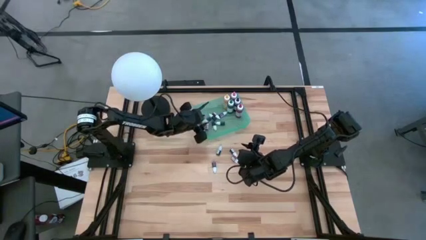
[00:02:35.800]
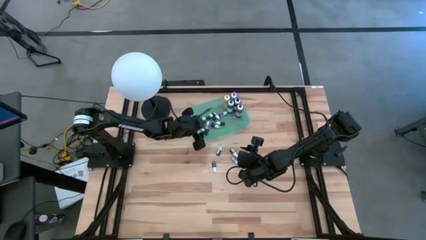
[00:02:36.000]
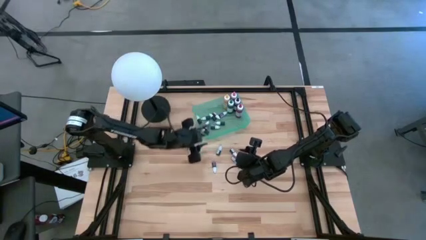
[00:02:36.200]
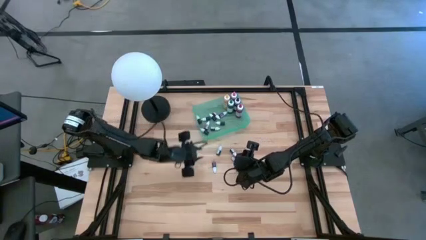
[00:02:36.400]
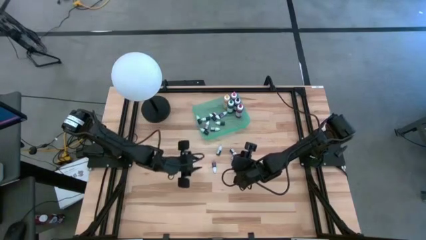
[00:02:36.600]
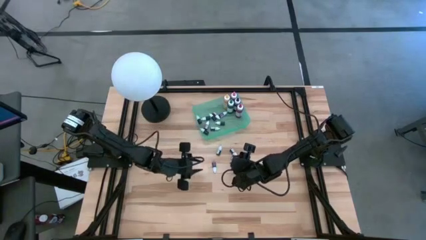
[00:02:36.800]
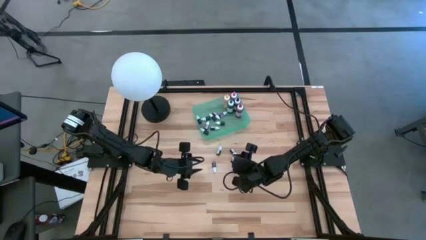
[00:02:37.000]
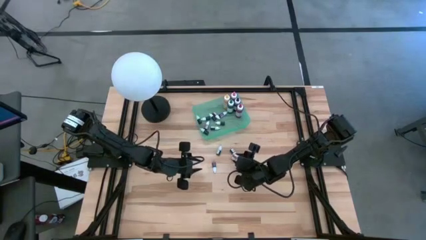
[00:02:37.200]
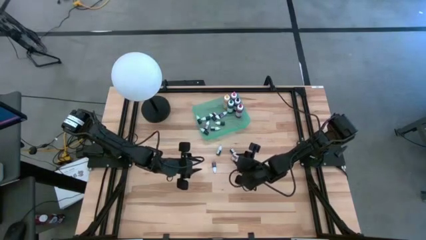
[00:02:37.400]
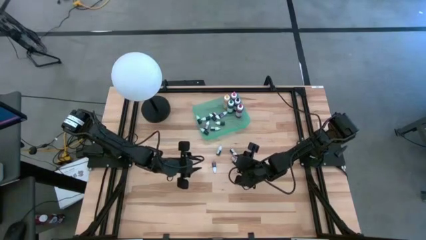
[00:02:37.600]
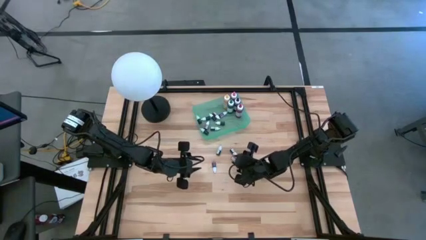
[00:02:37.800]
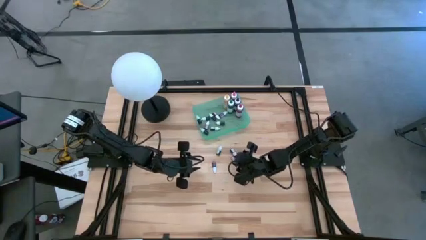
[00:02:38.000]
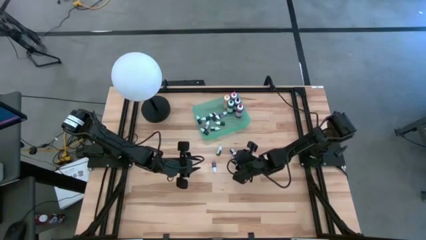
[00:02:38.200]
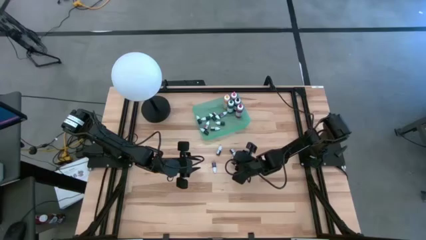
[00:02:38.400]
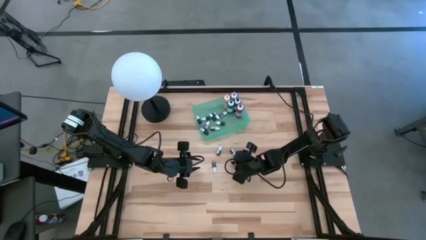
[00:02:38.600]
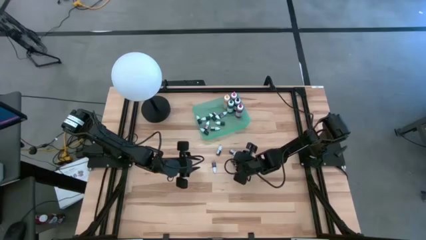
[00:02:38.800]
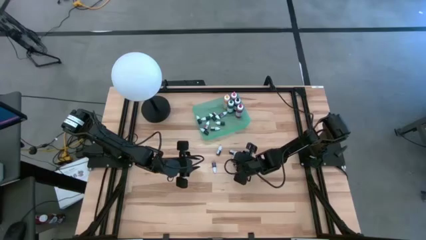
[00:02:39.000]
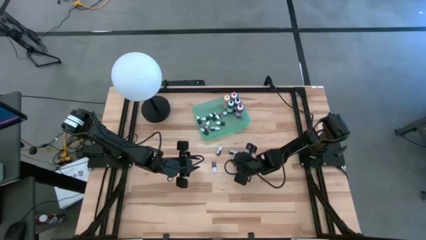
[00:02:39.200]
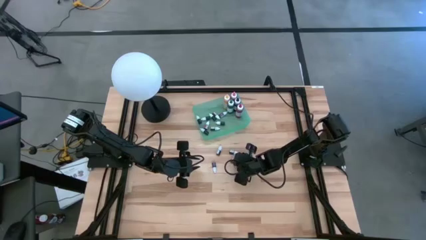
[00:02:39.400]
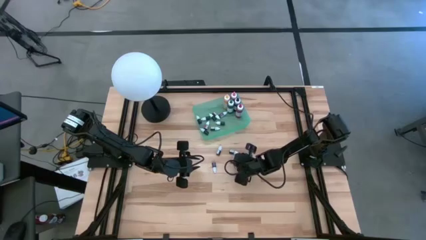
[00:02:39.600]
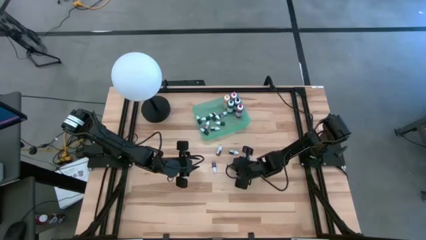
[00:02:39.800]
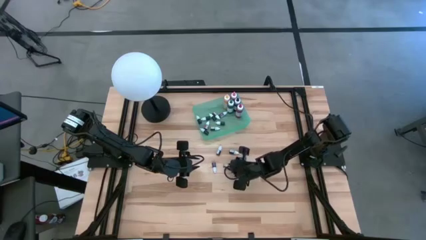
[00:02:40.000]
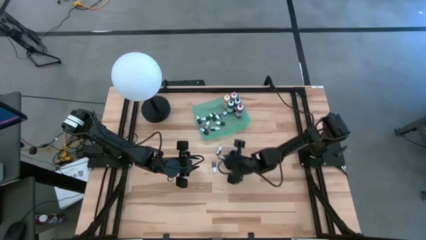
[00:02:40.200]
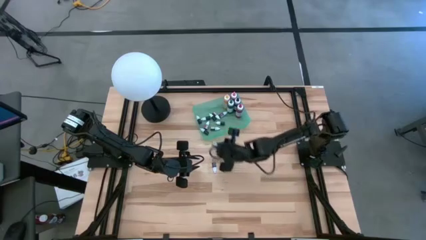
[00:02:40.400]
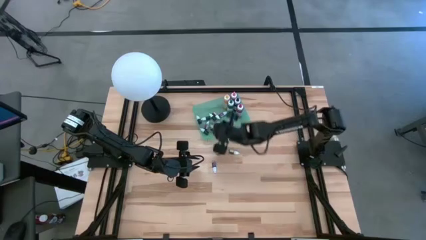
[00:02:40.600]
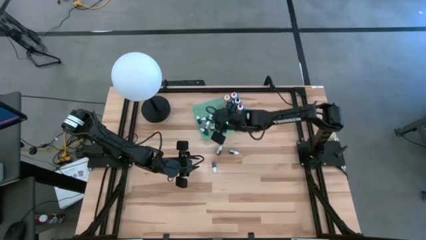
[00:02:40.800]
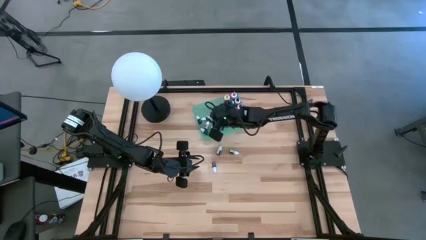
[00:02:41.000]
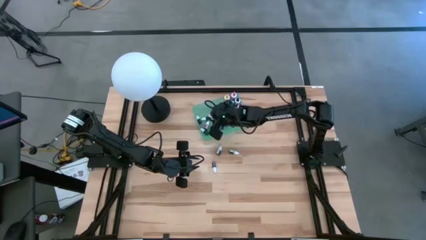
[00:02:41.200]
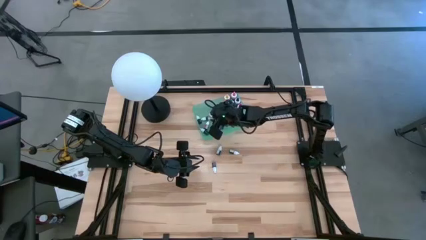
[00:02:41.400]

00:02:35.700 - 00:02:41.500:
Task: Pick & Place food coloring
Put the red food coloring bottle into the green bin

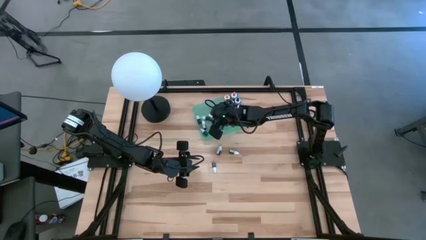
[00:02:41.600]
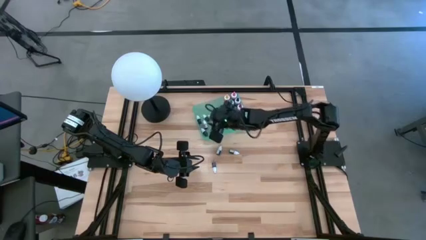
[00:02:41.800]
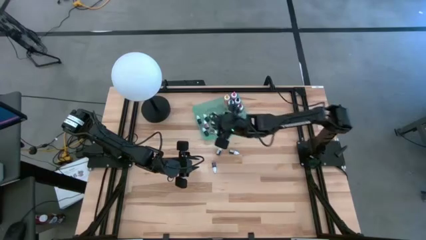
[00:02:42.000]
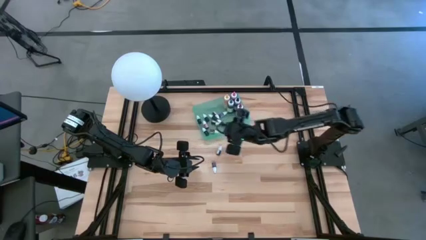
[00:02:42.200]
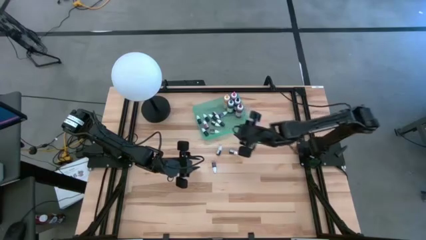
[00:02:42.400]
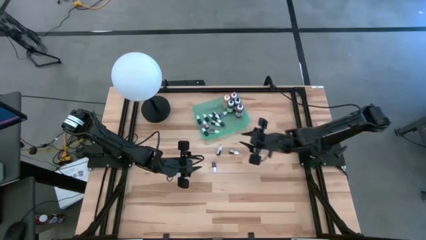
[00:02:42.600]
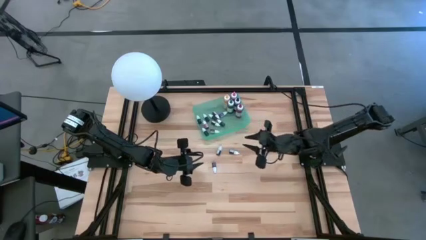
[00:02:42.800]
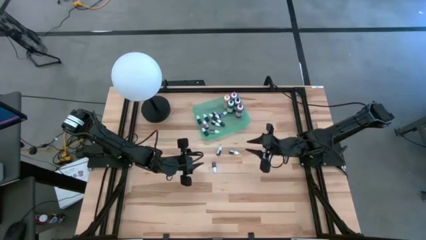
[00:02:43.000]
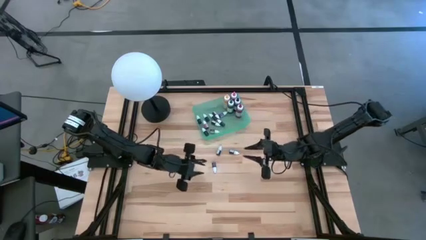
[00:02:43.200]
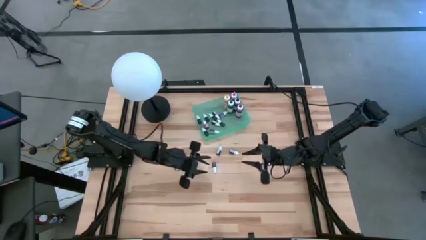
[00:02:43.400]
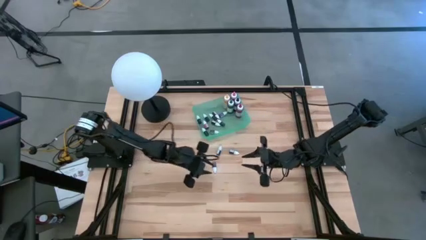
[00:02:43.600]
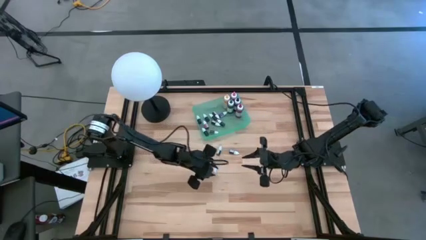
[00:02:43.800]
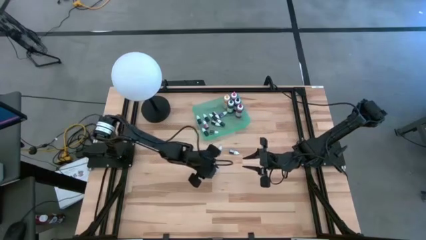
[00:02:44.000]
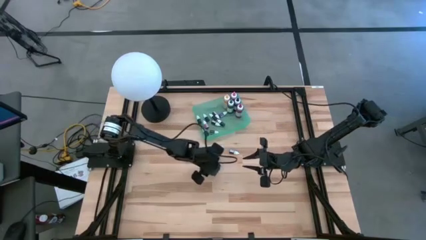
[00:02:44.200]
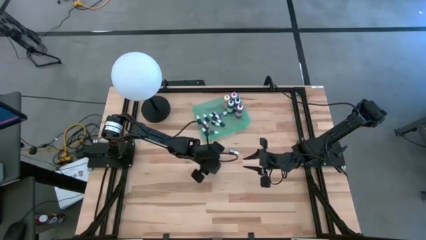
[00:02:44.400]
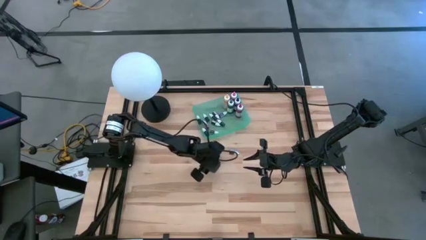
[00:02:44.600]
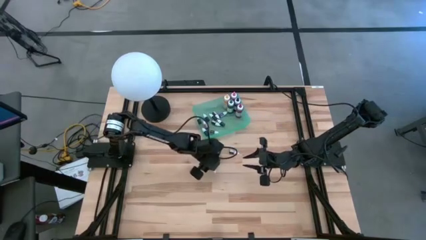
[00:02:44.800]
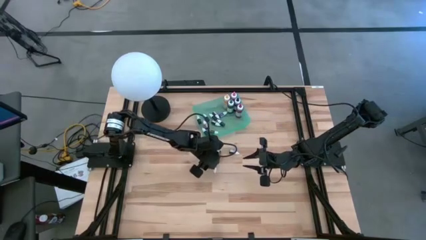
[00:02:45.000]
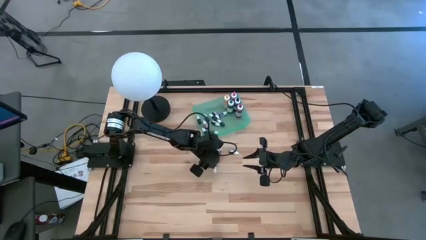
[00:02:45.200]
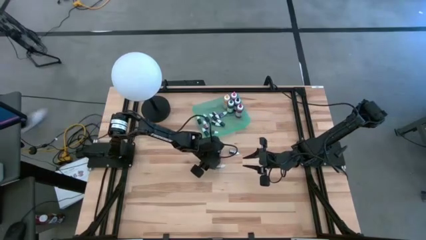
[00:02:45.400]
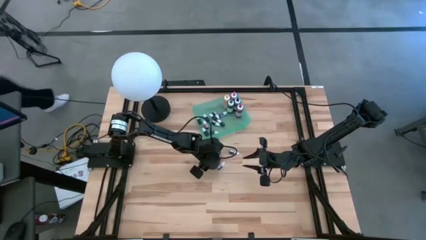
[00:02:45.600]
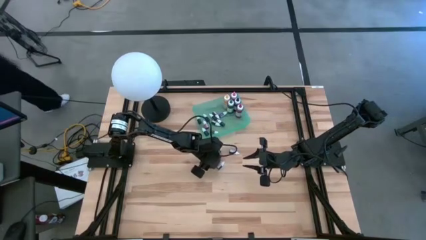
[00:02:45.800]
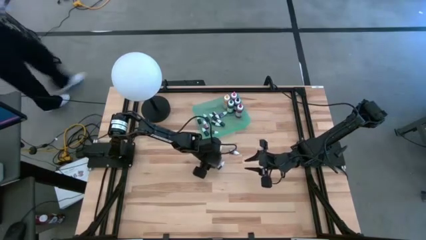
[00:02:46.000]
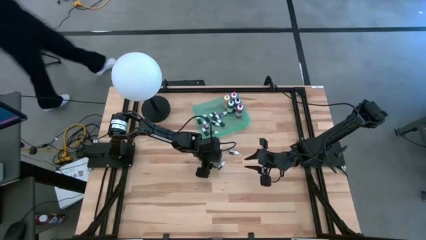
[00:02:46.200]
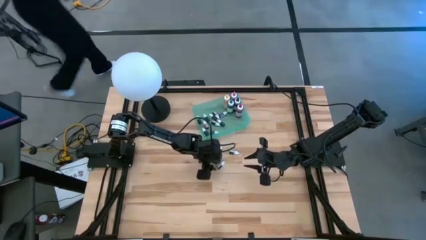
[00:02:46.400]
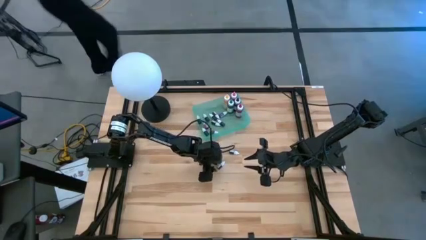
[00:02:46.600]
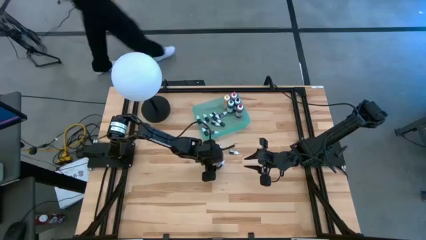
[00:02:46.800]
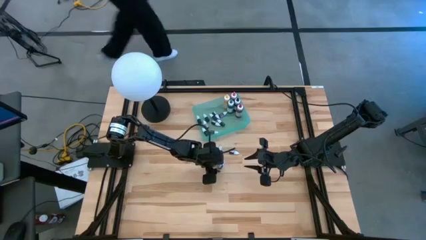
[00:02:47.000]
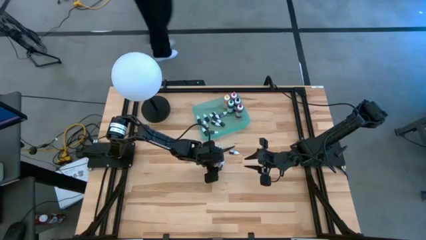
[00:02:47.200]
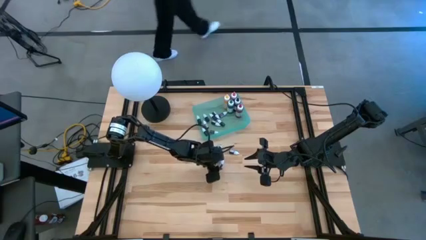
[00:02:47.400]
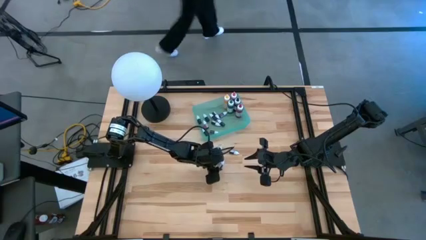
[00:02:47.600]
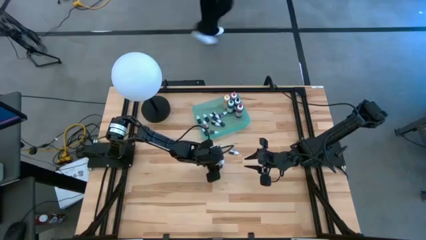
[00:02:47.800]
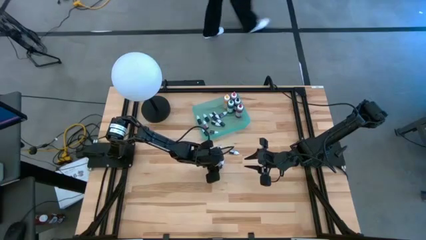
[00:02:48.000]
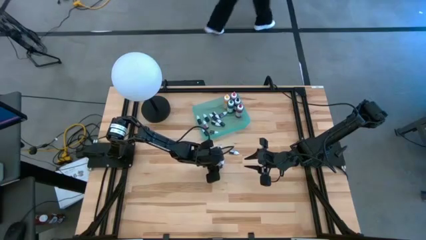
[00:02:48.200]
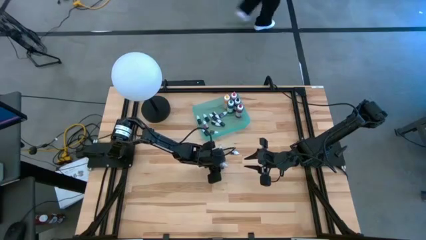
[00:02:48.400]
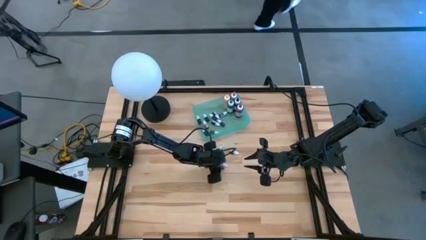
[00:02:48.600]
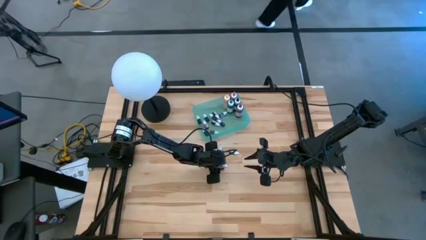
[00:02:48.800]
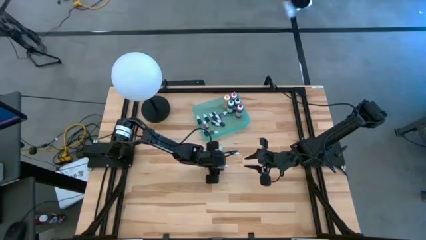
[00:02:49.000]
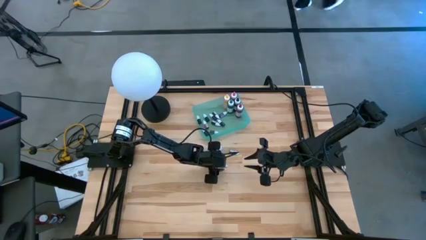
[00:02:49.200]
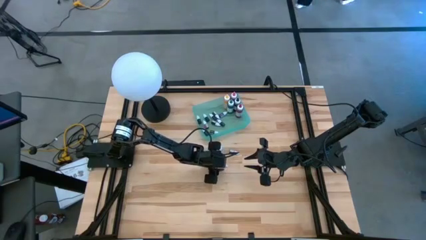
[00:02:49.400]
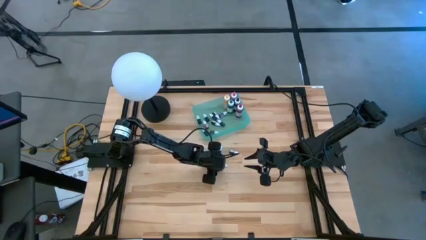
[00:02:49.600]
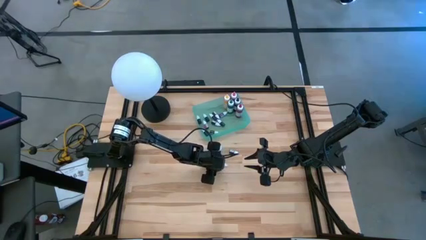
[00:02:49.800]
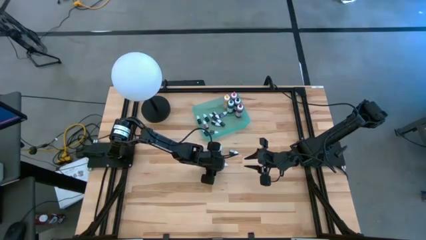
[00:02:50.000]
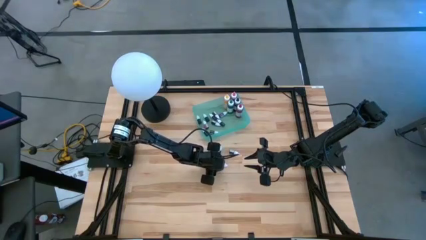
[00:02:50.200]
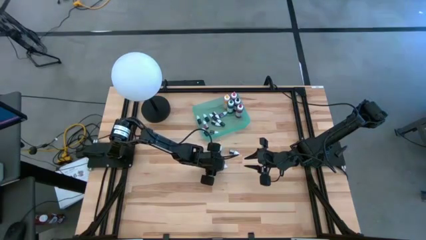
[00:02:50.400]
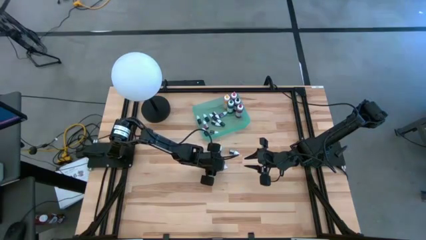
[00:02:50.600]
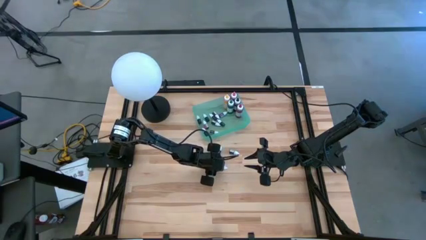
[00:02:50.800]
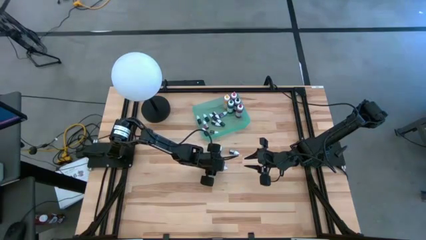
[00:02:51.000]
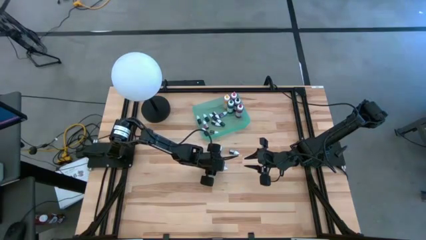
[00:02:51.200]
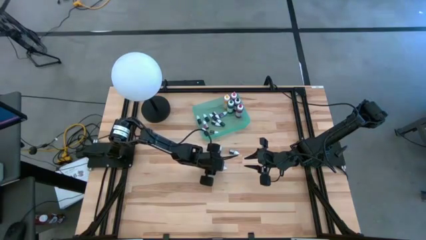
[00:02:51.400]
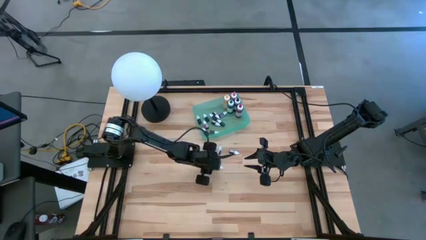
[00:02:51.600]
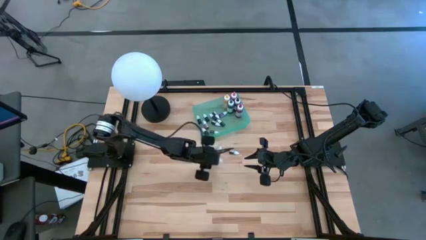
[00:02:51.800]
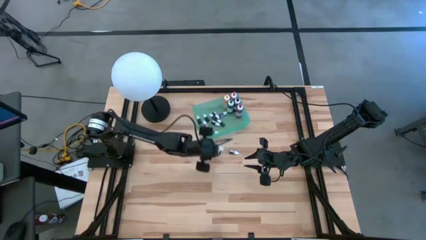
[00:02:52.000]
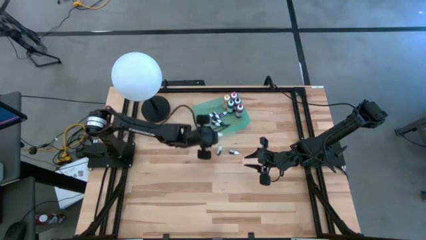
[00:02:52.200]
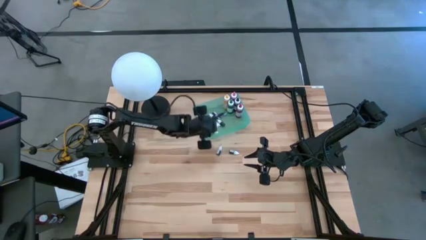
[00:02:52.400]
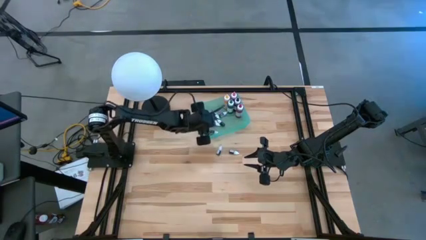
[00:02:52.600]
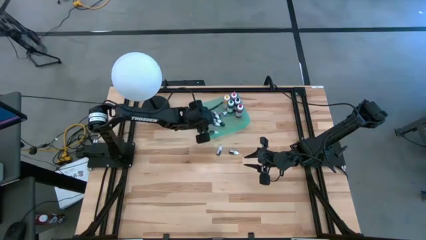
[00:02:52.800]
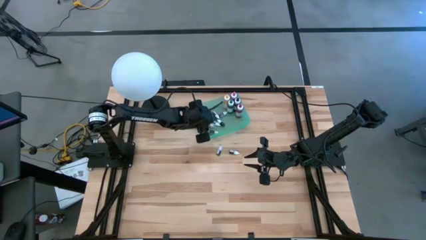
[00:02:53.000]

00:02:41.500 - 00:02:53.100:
Put the purple food coloring bottle into the green bin
